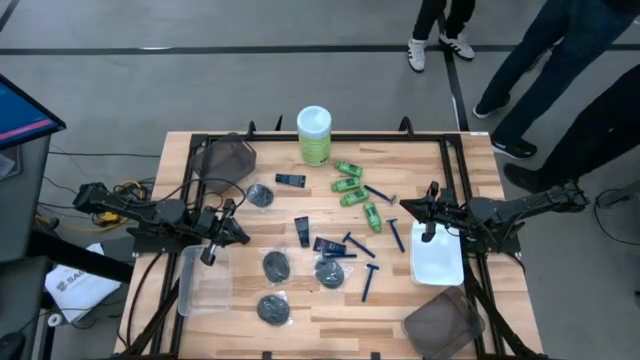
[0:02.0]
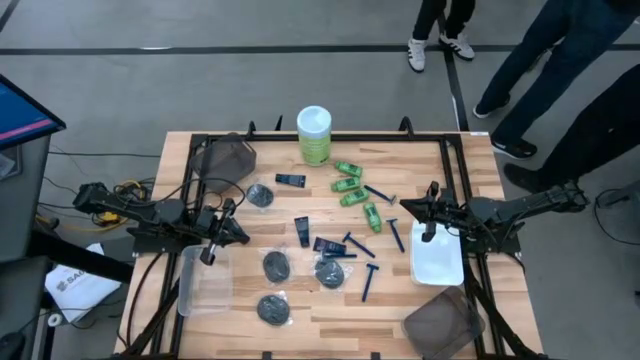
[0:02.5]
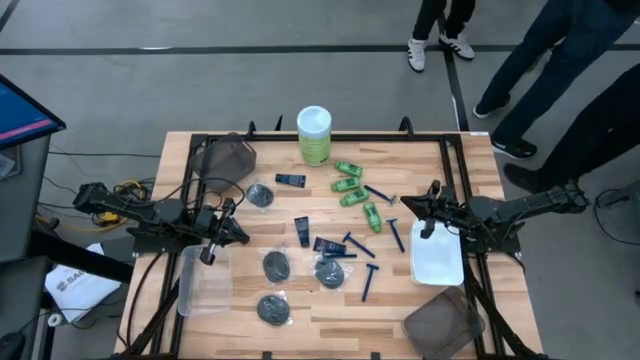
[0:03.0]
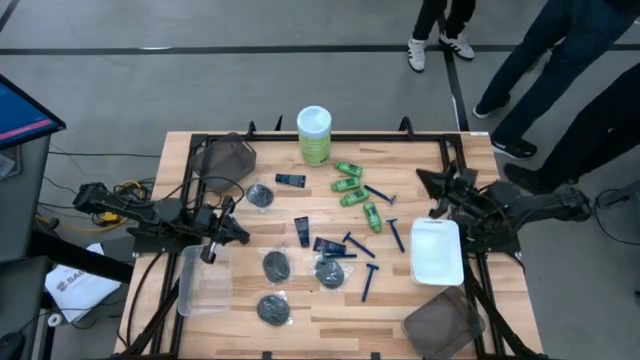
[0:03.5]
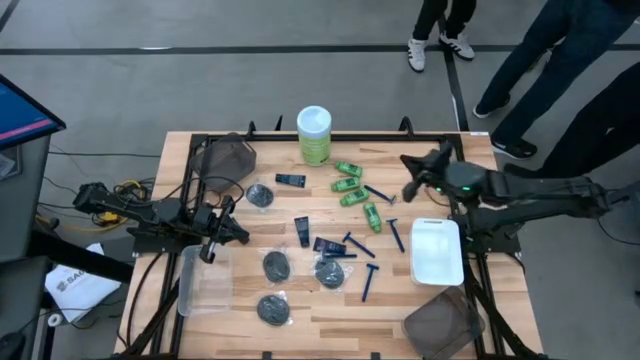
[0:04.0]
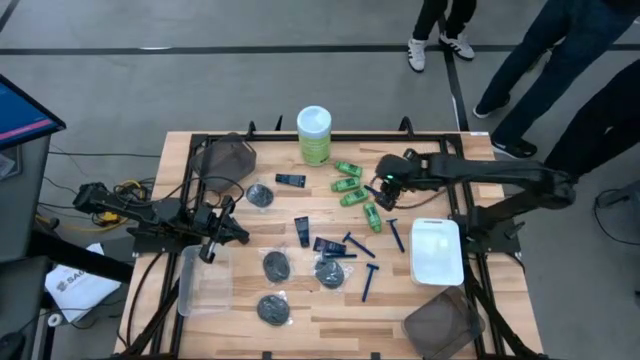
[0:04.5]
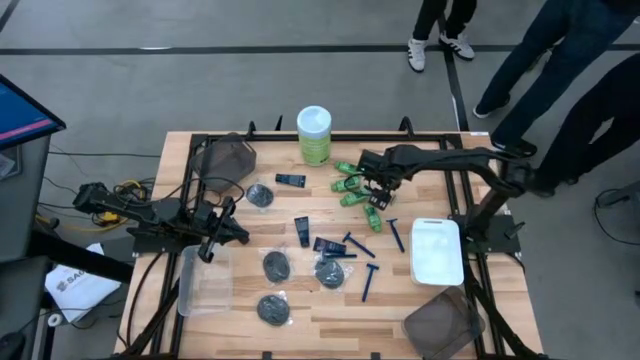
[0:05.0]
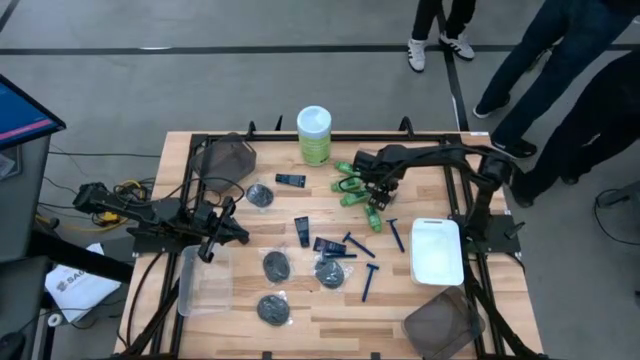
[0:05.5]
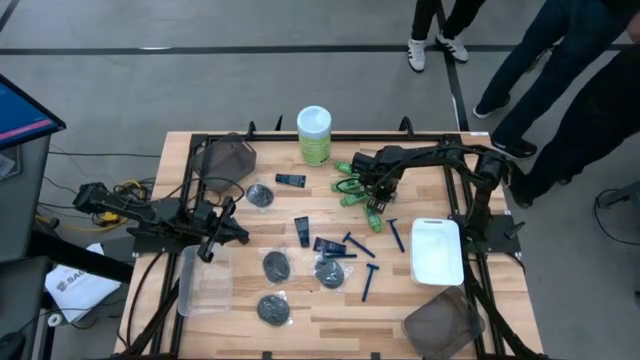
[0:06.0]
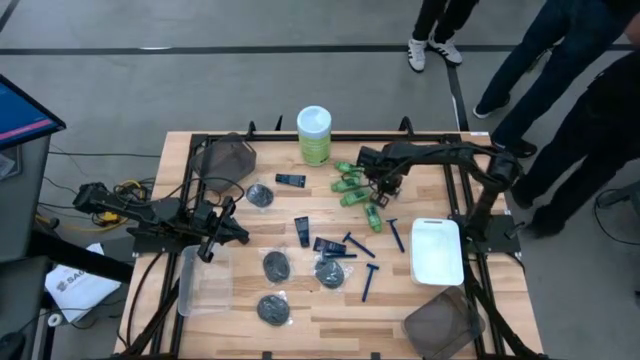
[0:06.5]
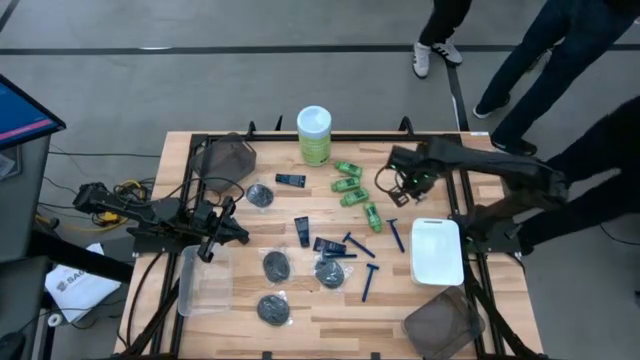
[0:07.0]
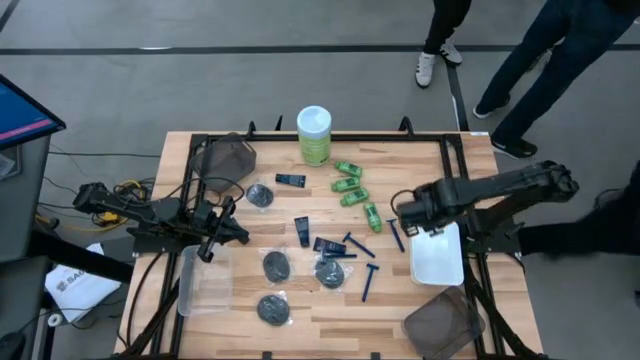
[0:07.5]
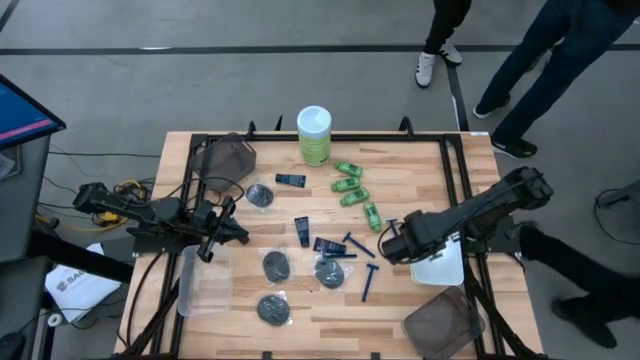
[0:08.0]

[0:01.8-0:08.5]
Task: Pick & Place Travel size toiletries
Put the blue razor into the white bin

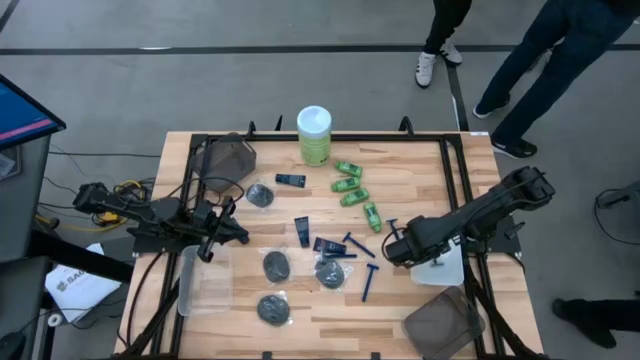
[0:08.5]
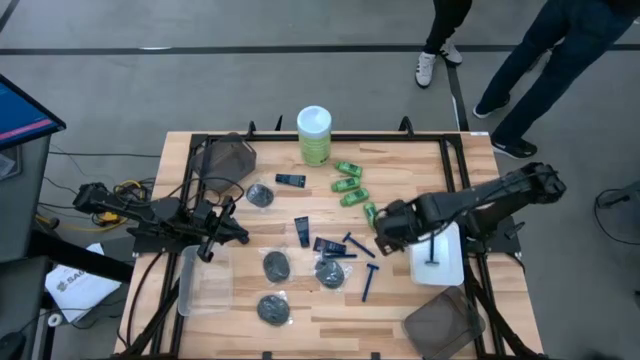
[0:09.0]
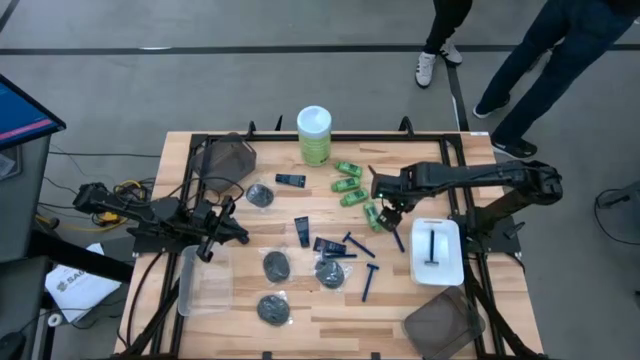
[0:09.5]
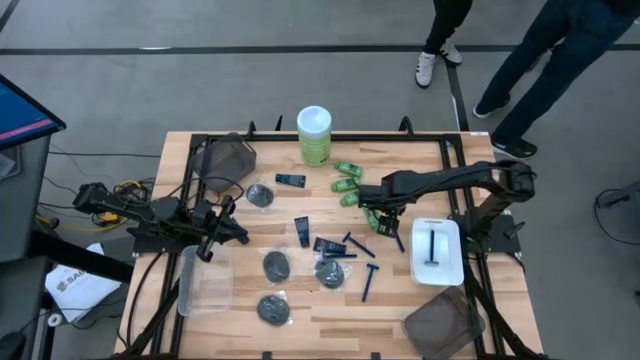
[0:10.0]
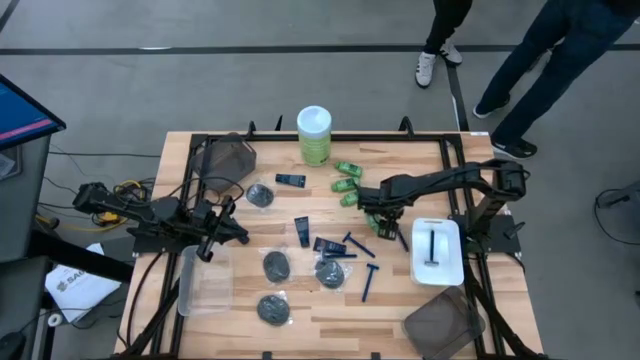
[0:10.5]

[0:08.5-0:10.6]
Put the blue razor into the white bin

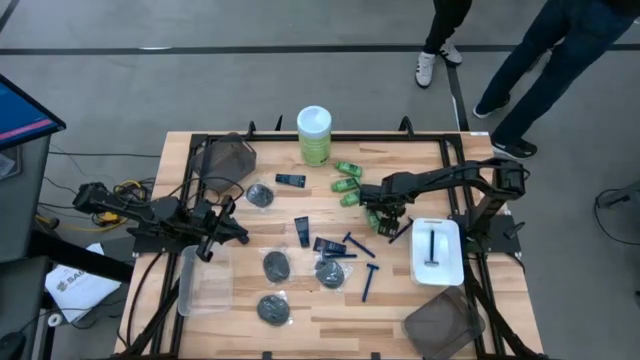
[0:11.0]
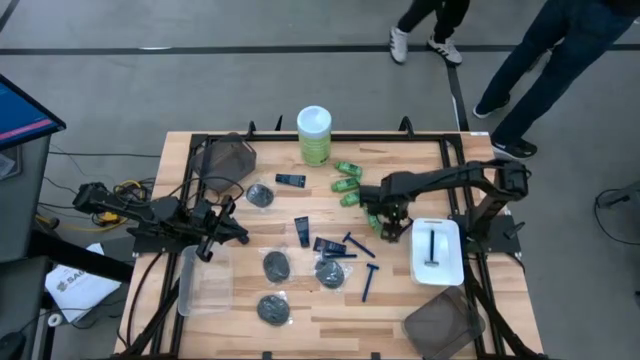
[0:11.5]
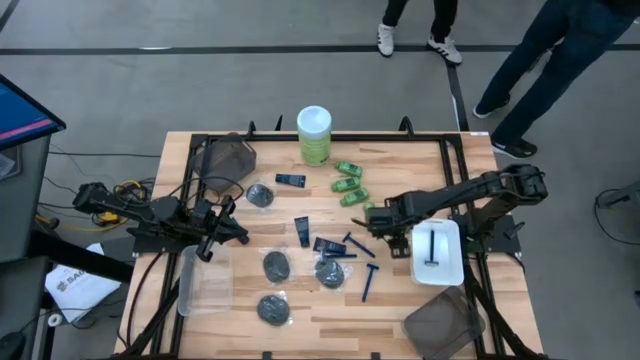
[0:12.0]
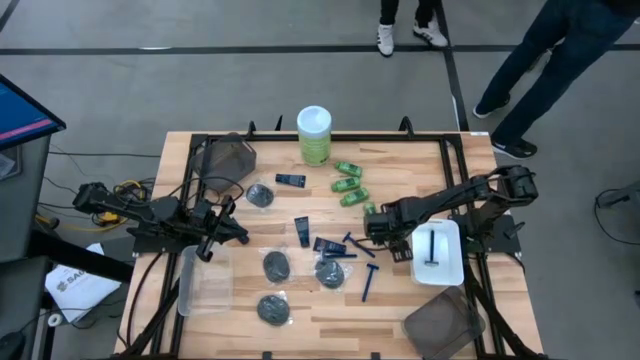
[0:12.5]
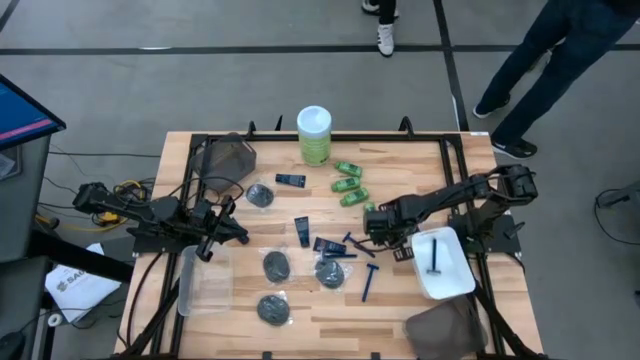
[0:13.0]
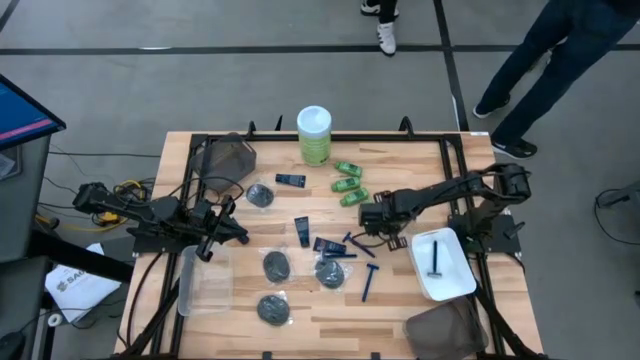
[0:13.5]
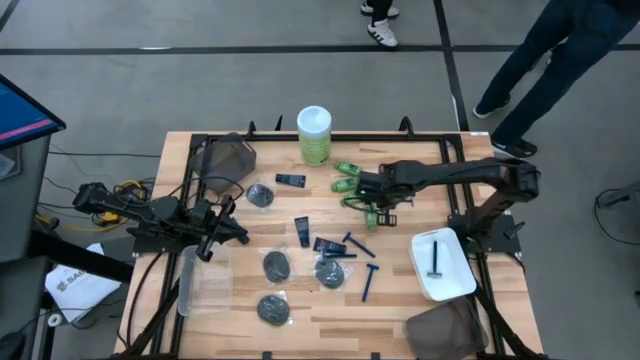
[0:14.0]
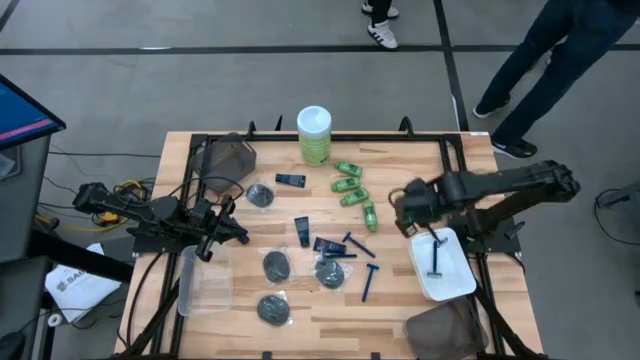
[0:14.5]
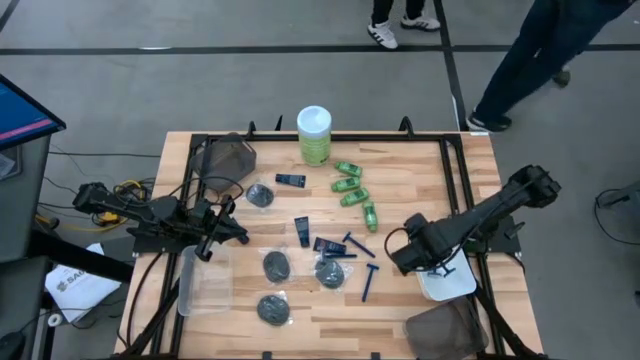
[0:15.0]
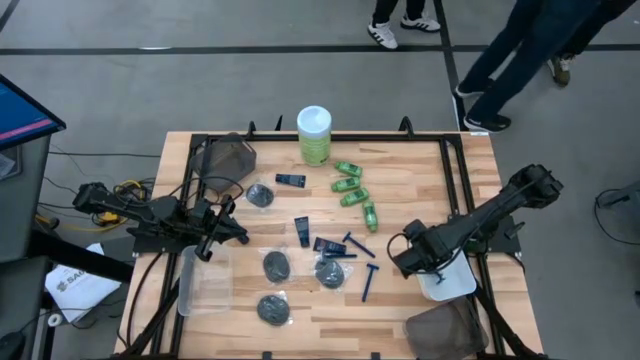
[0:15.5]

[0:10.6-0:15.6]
Put the blue razor into the white bin

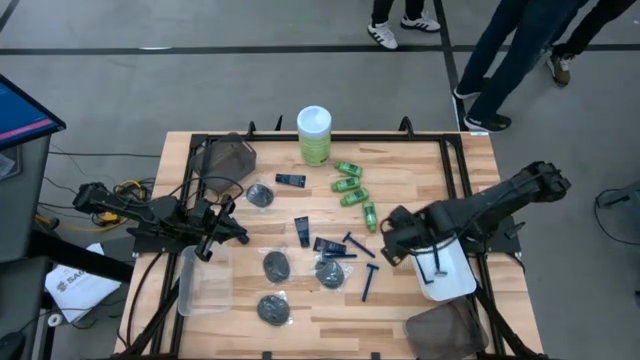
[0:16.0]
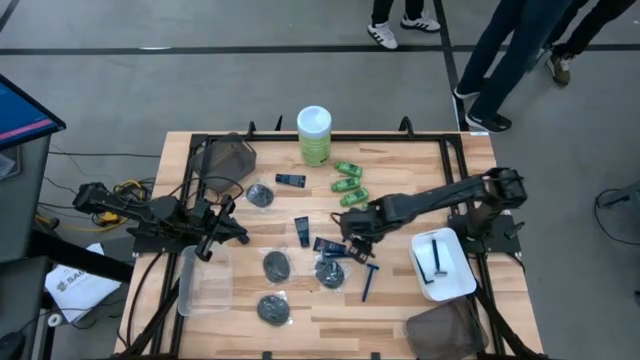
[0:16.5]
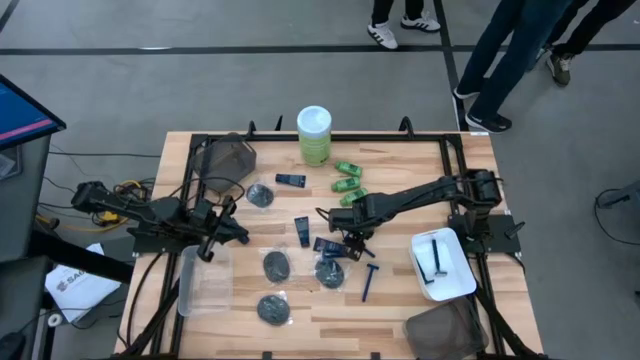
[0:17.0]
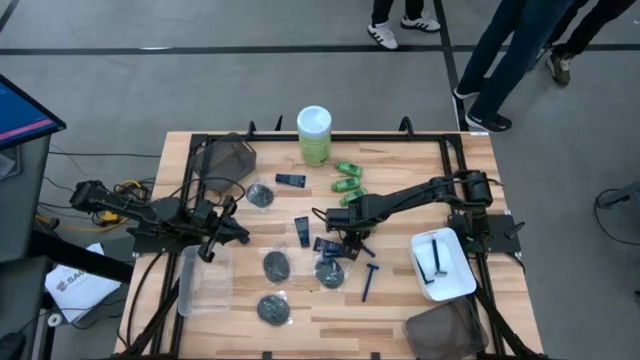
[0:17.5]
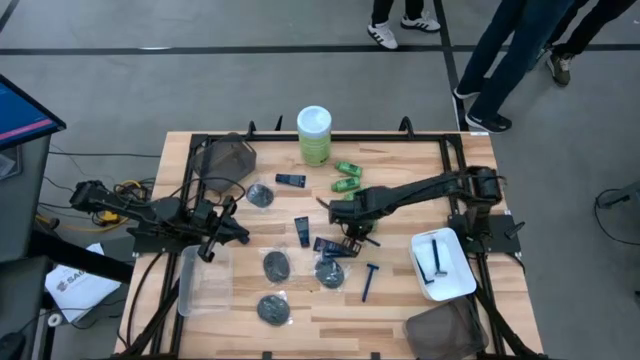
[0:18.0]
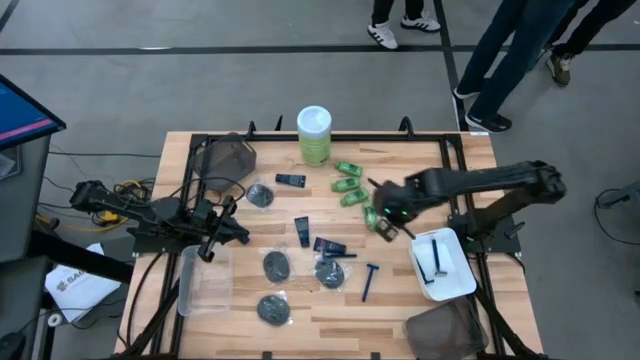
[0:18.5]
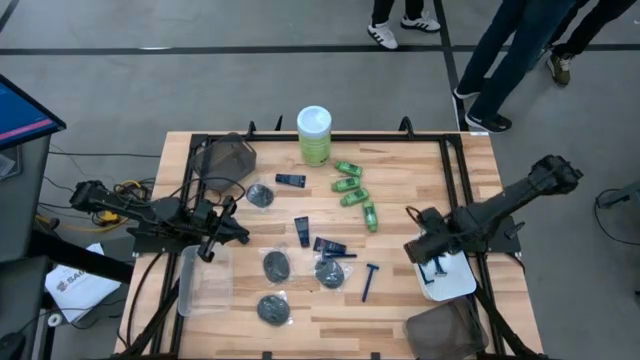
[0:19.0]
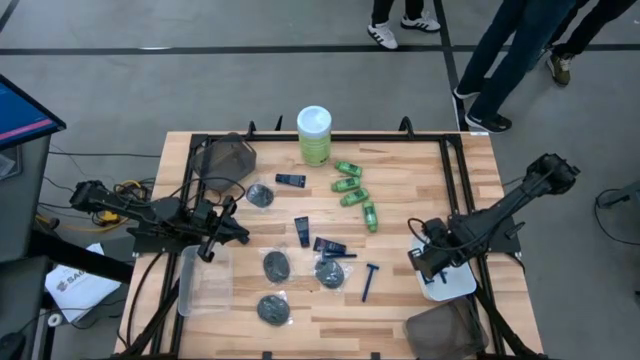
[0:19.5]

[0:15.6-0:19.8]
Put the blue razor into the white bin

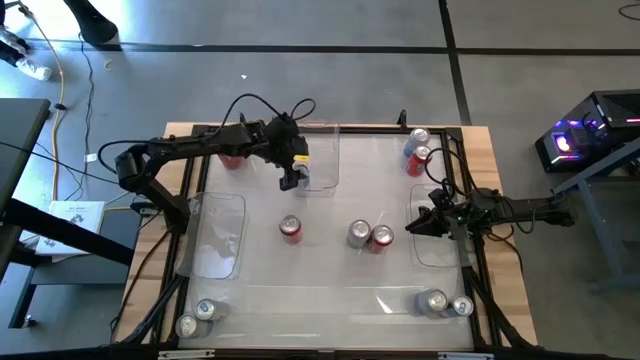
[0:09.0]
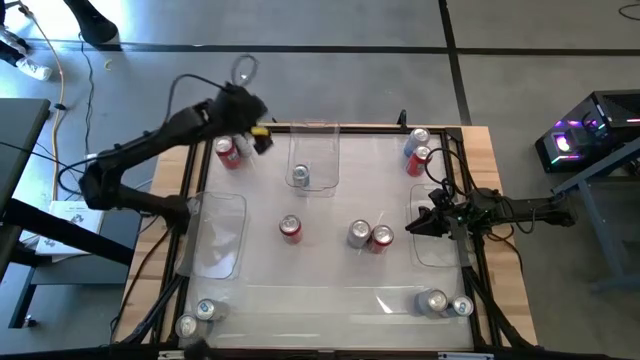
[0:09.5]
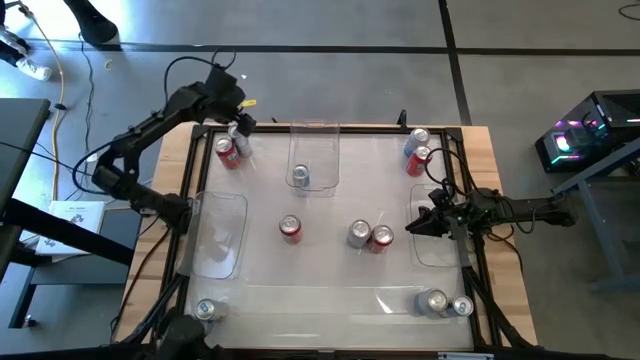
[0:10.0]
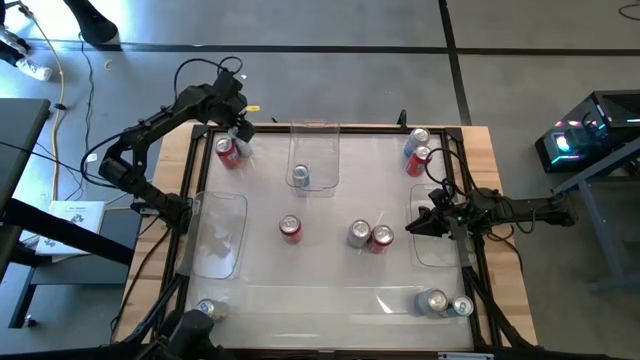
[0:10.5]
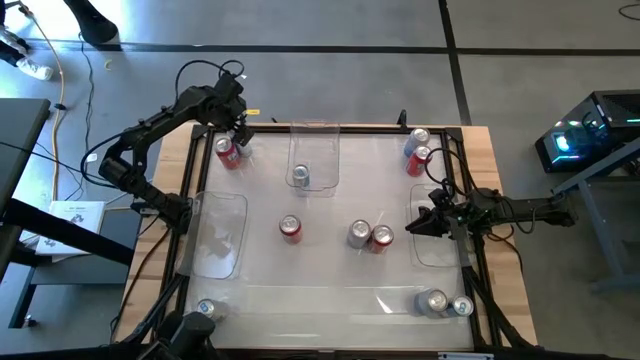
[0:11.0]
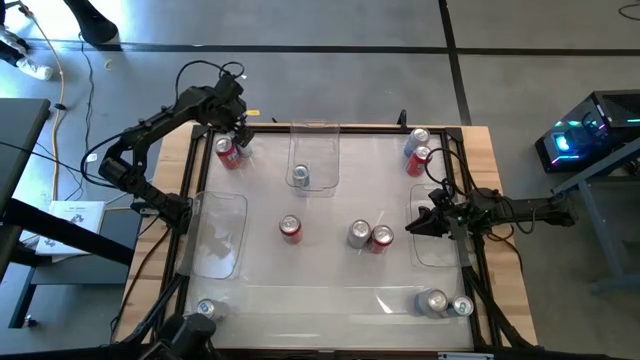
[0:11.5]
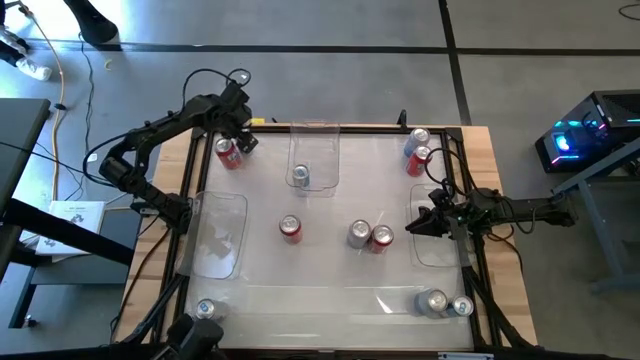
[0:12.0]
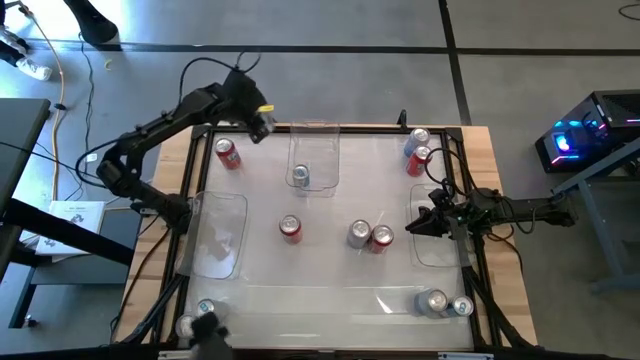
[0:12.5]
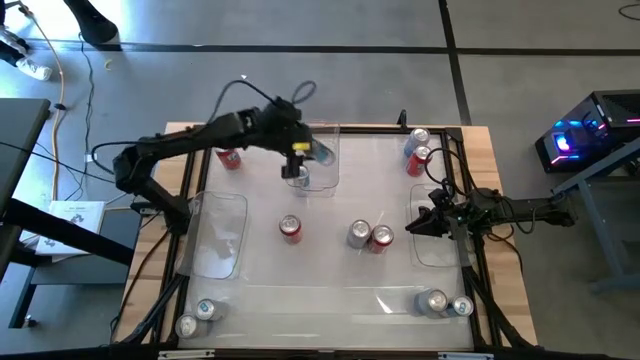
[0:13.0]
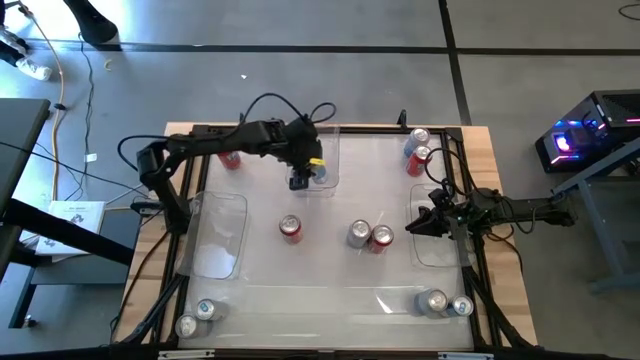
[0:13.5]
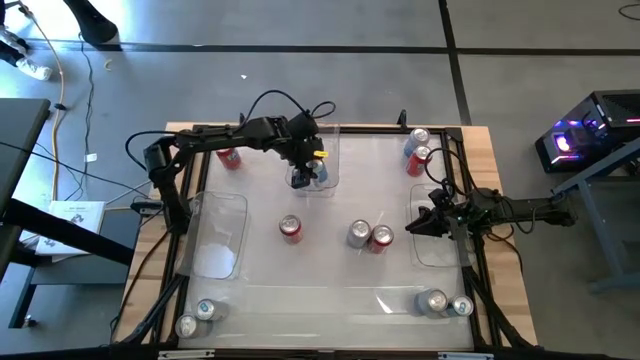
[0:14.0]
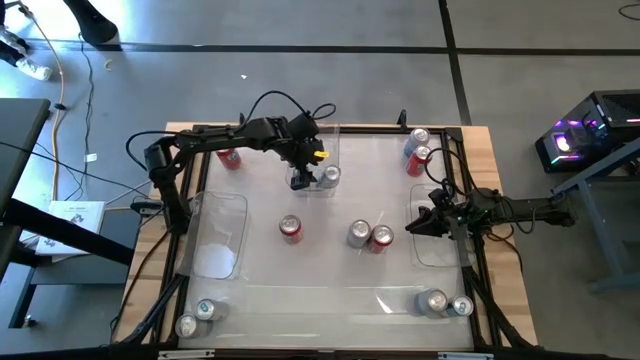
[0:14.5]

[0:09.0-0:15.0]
Task: Sort soda cans
Put the top blue soda can into the top center transparent bin
